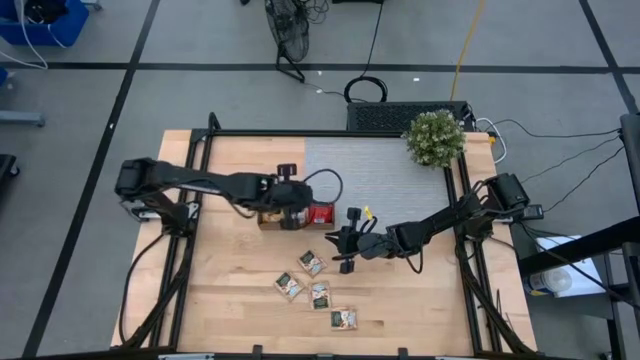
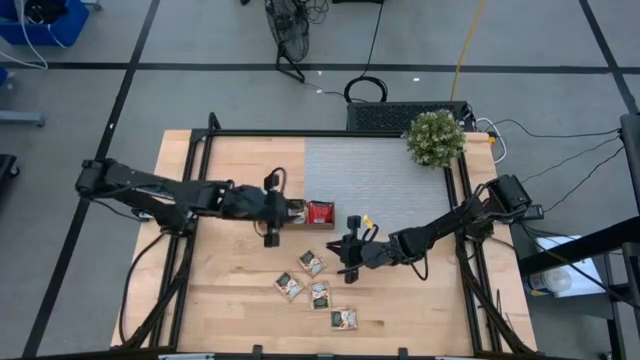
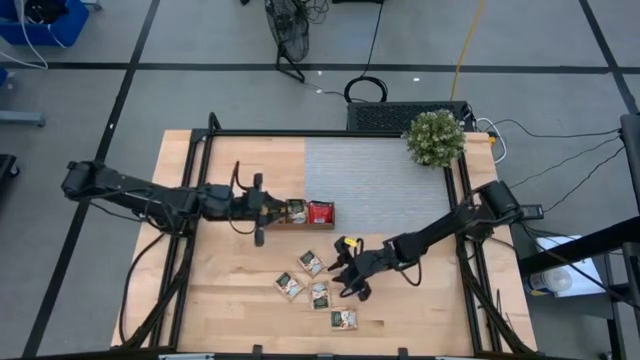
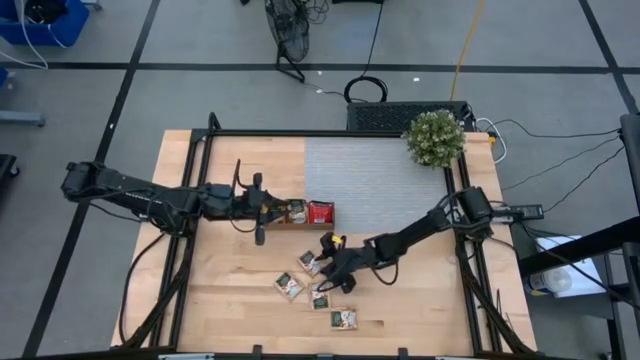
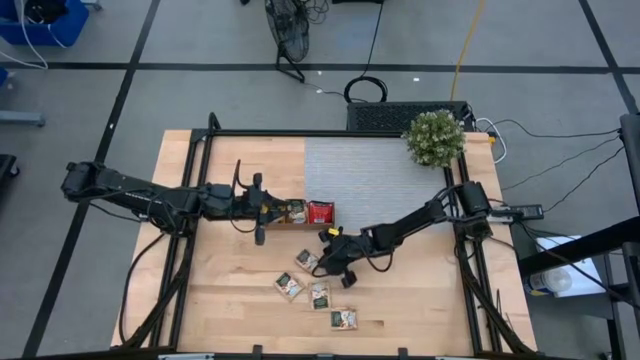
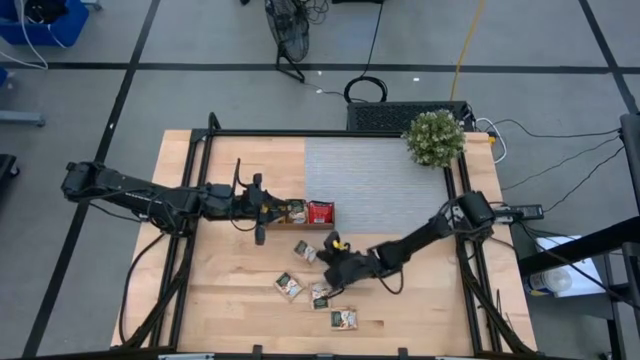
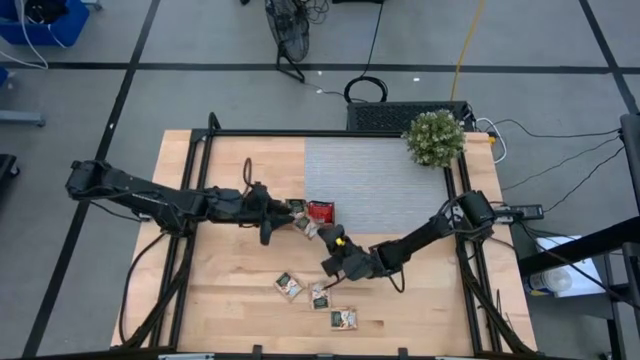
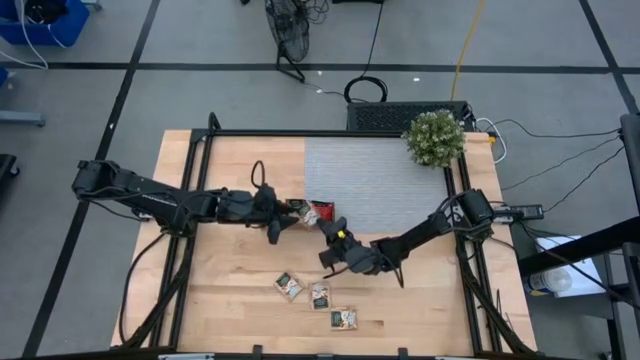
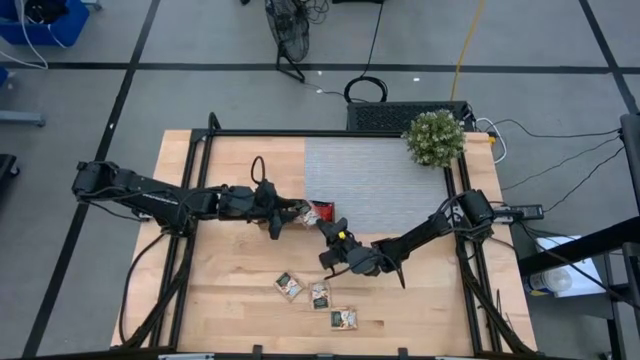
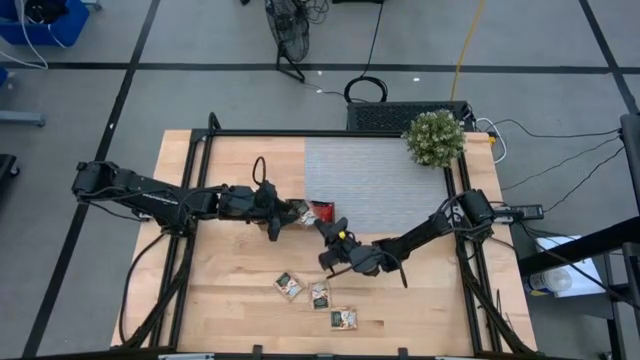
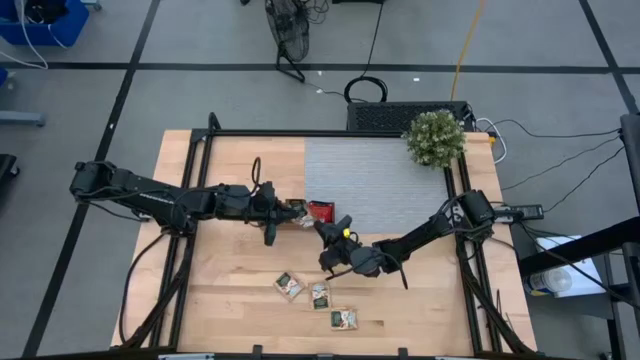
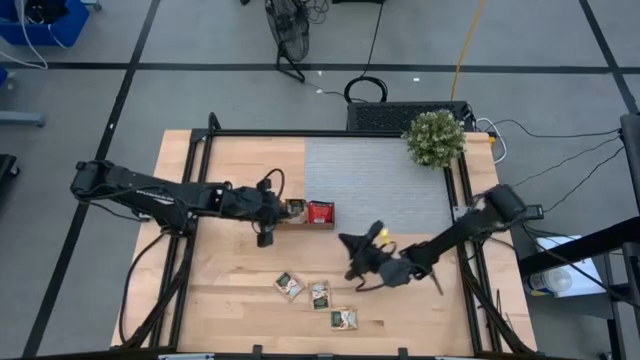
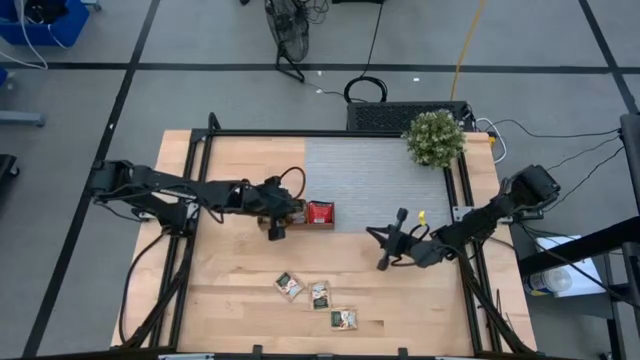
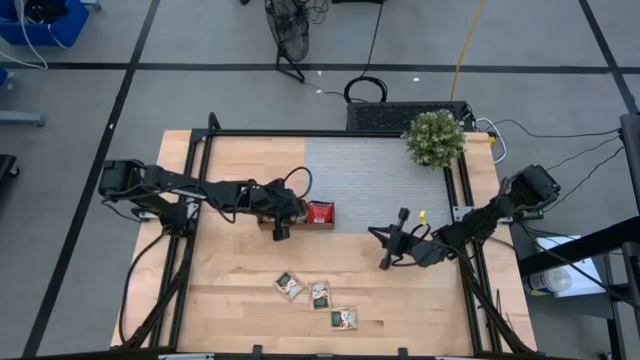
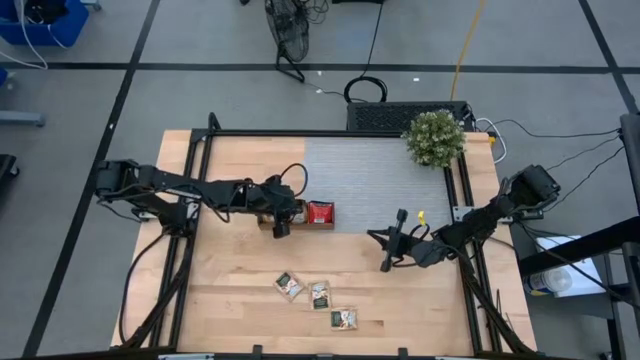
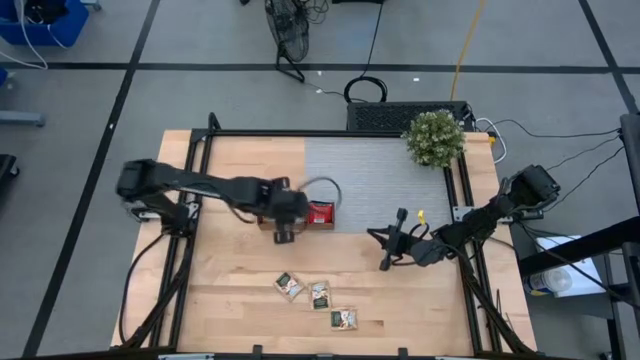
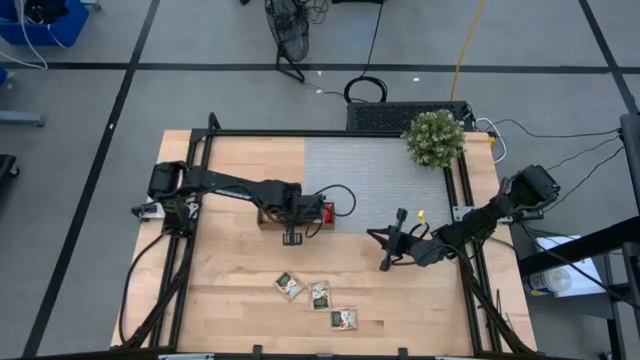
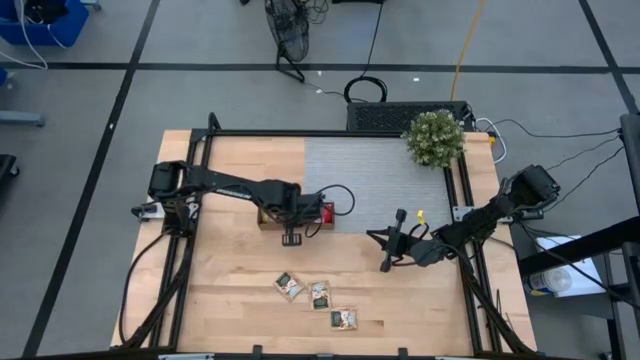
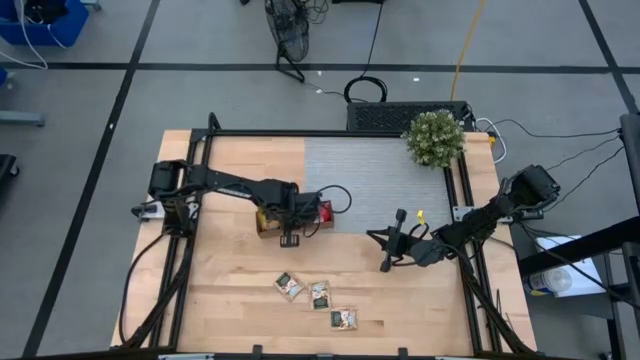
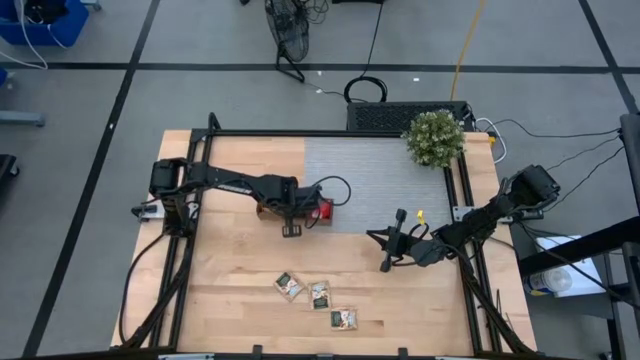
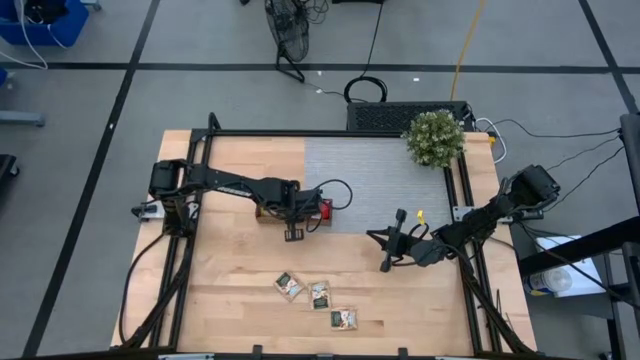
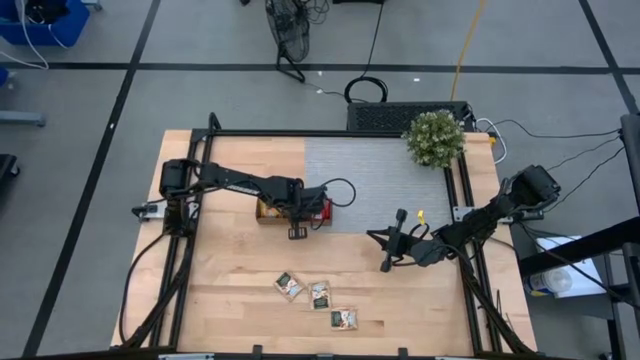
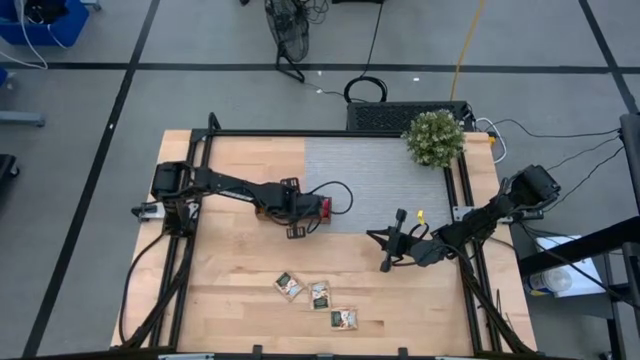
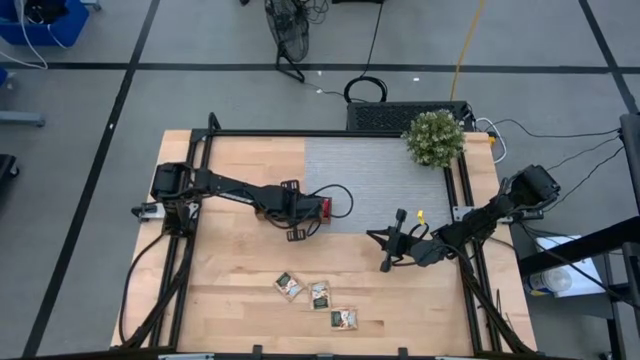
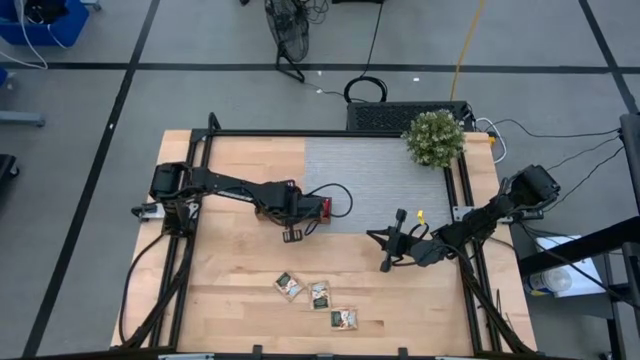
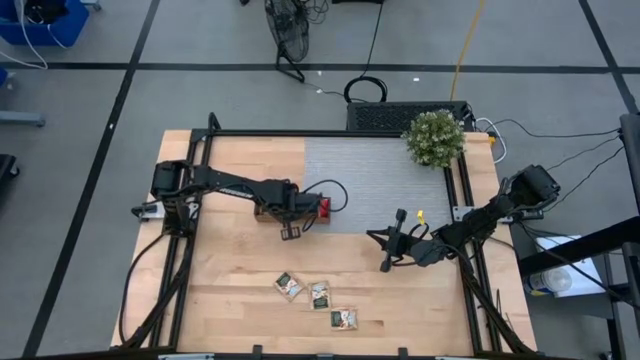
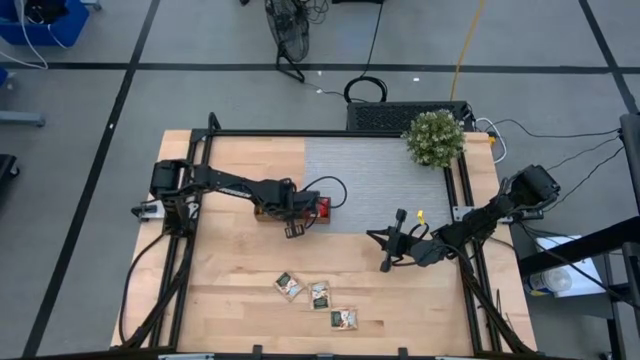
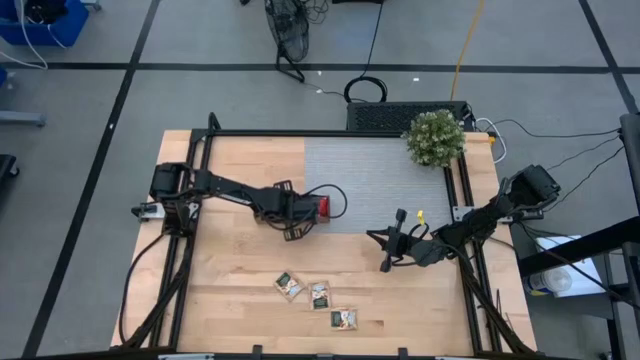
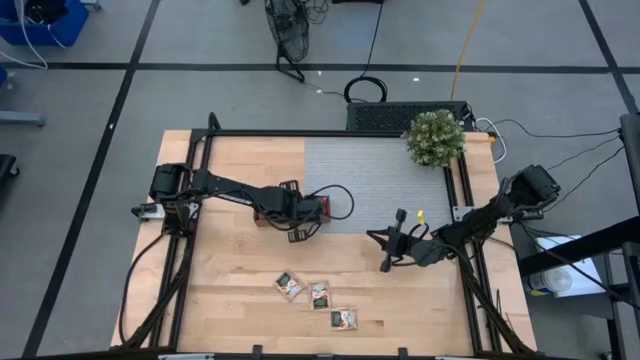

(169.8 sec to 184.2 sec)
Task: Pick & Place Tea
Put the brown tea bag into the middle section of the wooden organizer

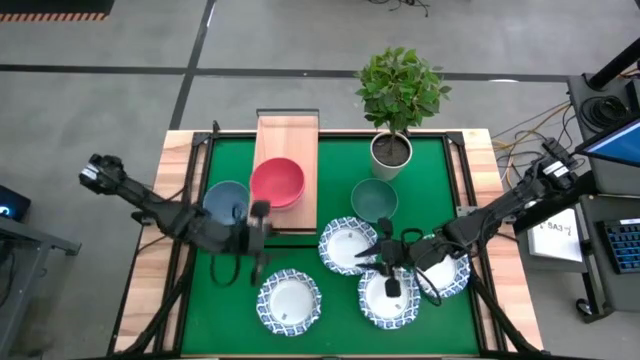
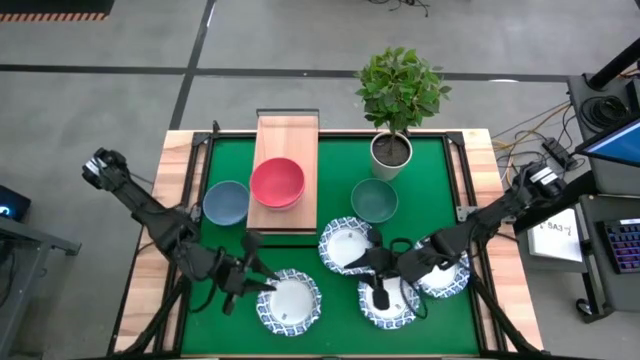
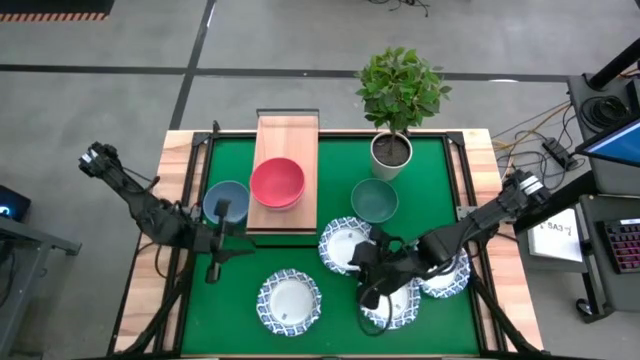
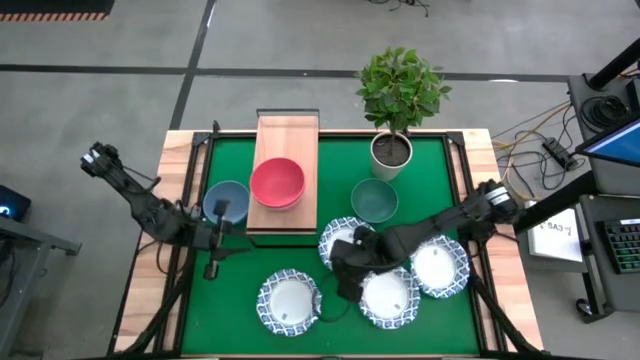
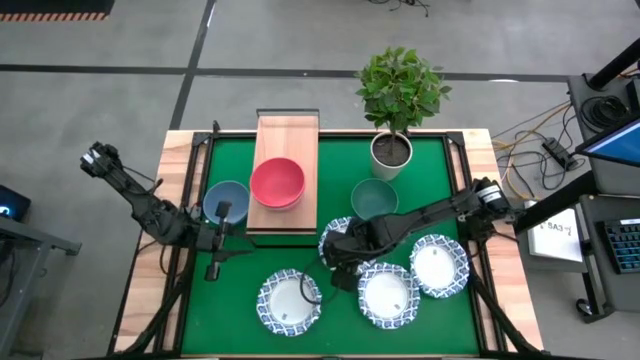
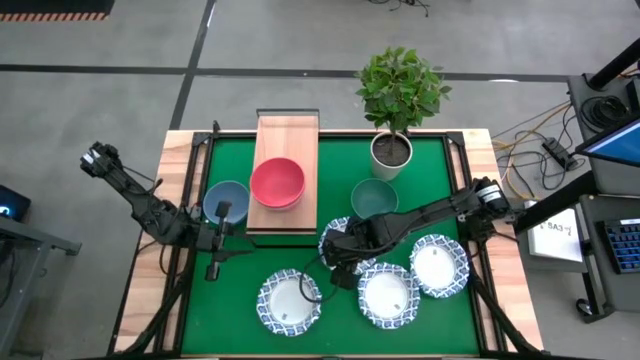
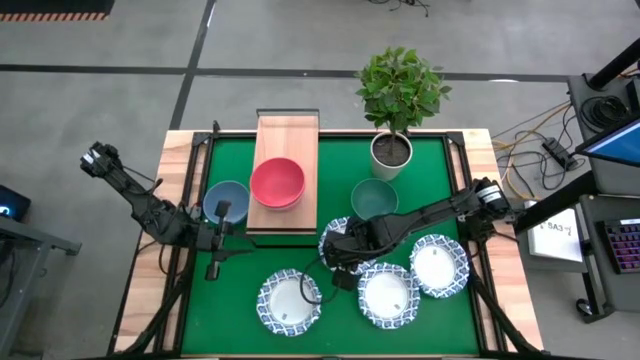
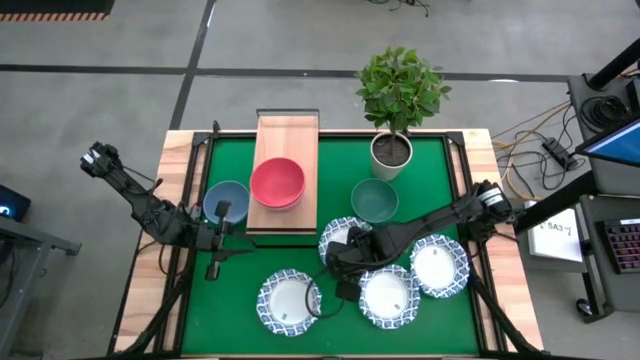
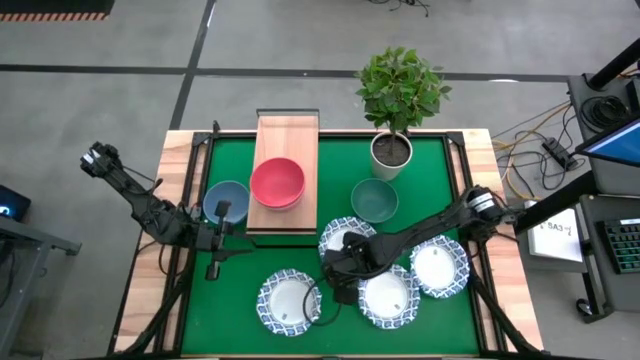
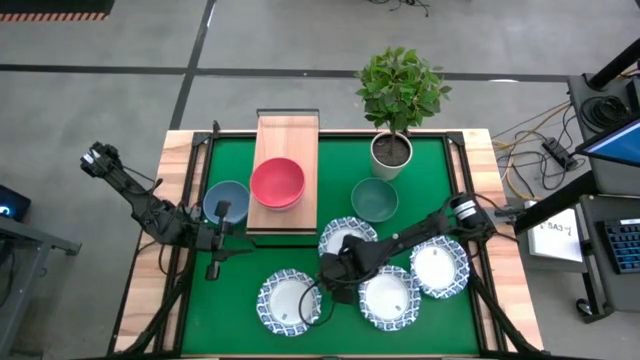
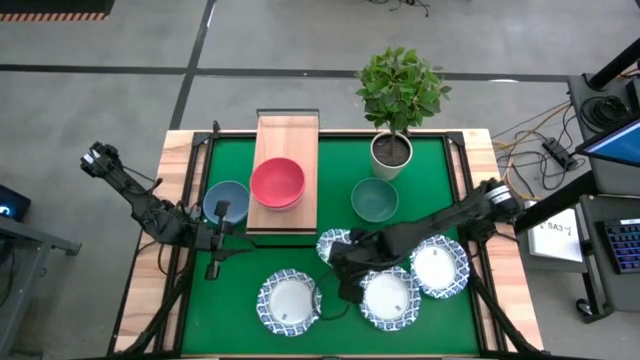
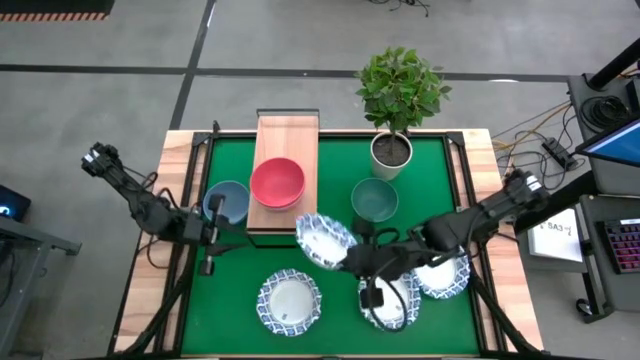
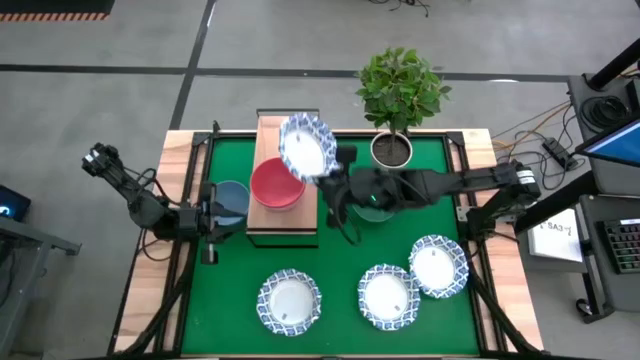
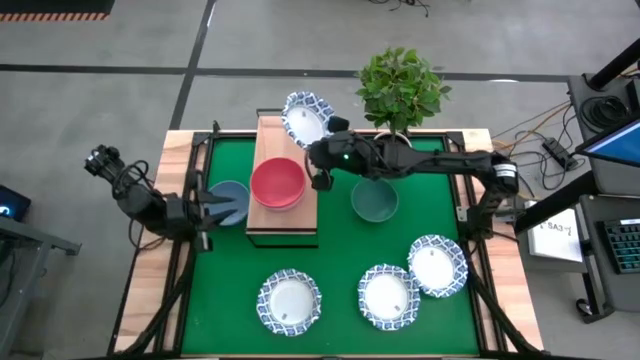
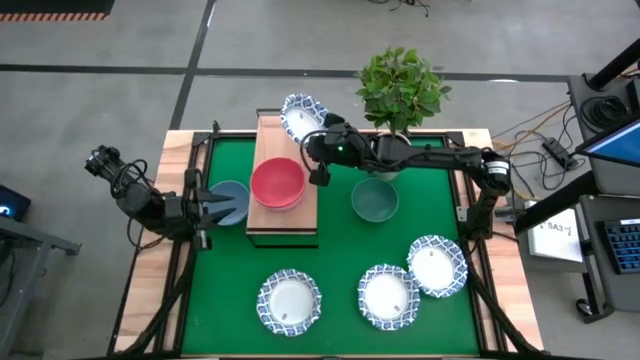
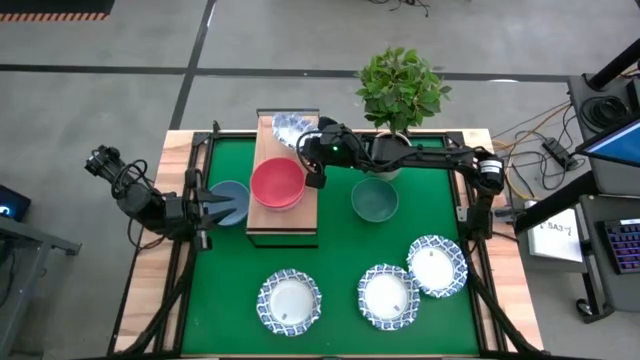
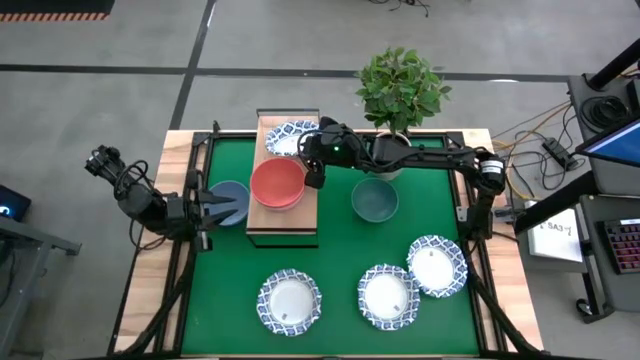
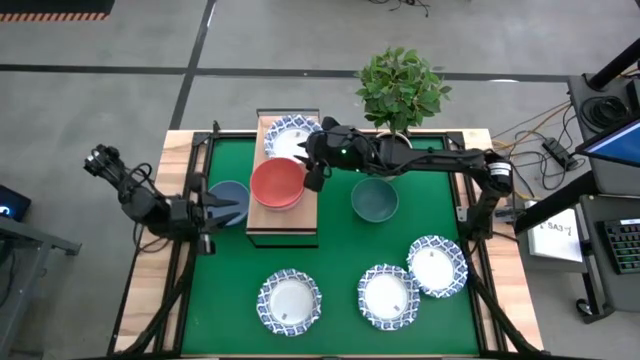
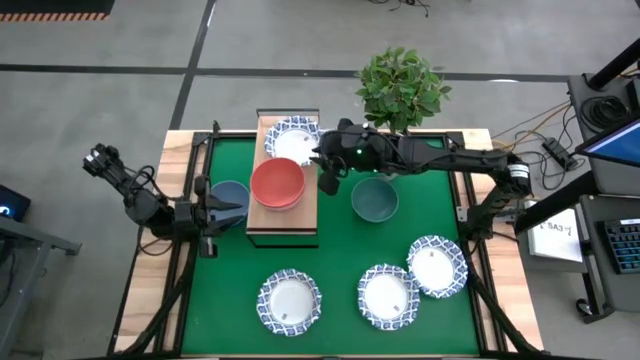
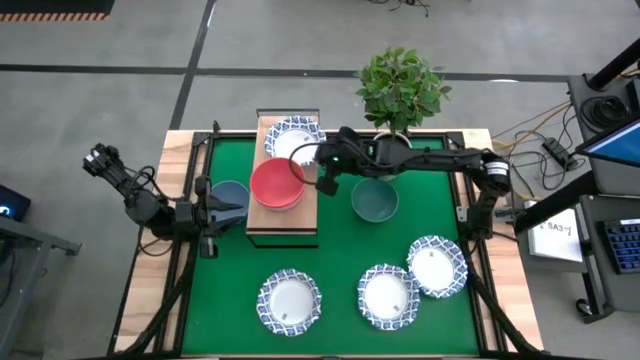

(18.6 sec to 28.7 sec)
Task: Place and stack bowls onto a shelf
Put the white patterned bowl on the shelf
